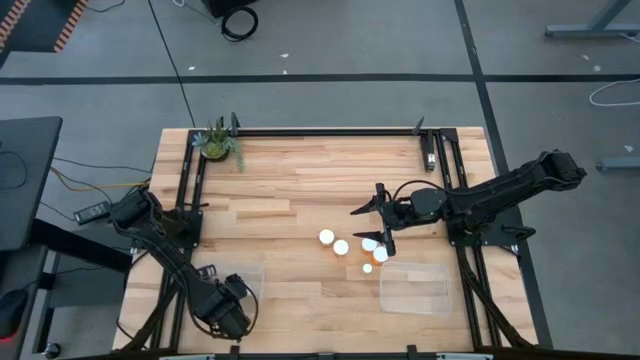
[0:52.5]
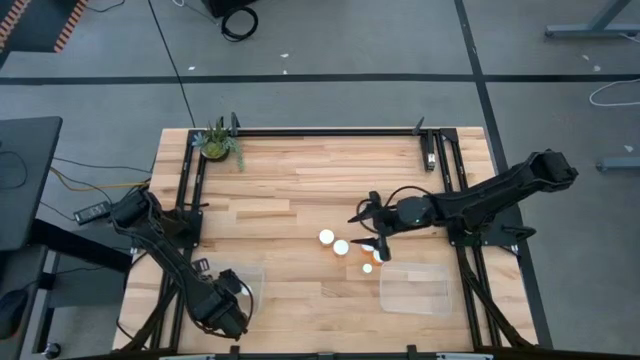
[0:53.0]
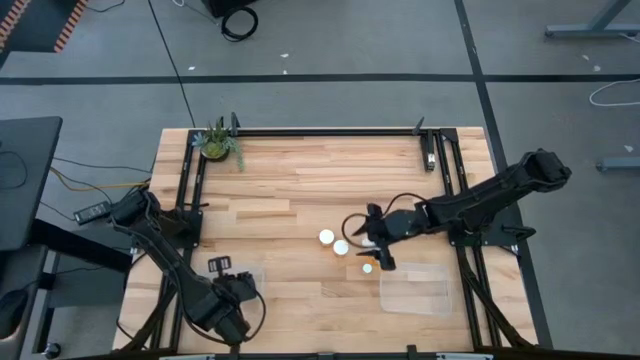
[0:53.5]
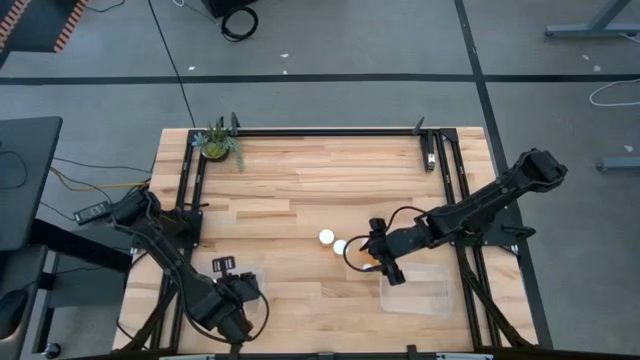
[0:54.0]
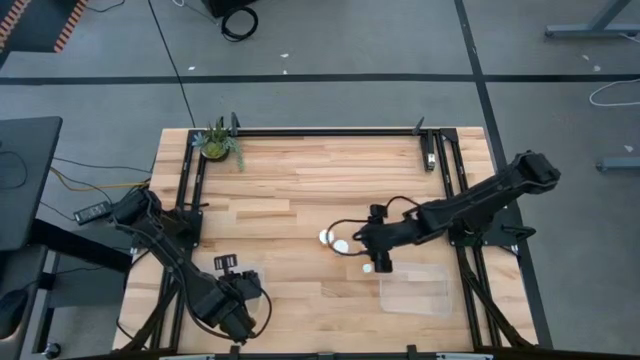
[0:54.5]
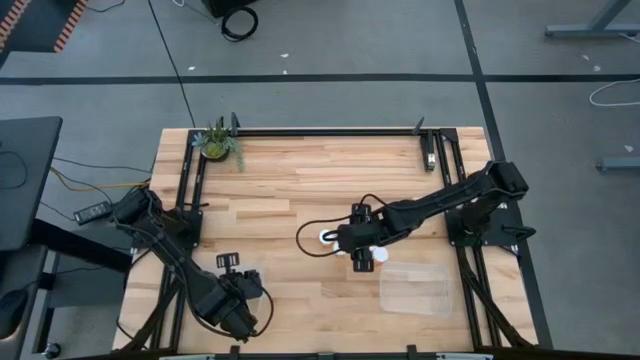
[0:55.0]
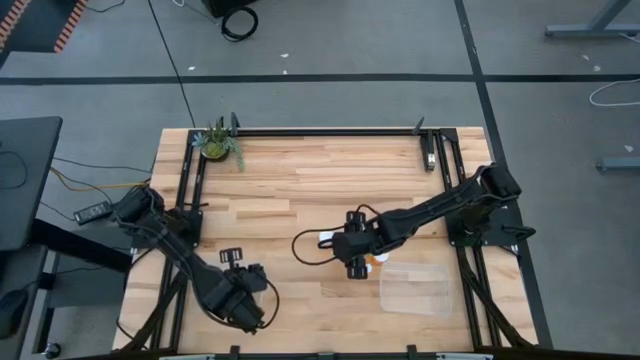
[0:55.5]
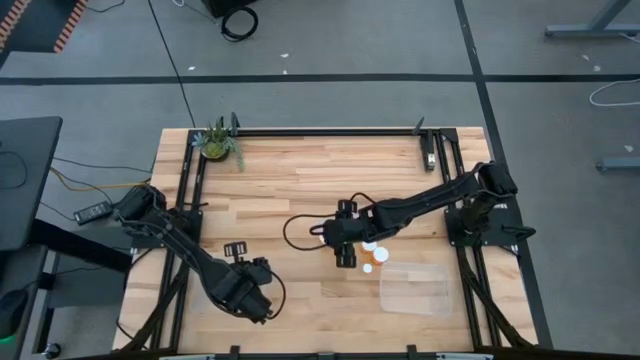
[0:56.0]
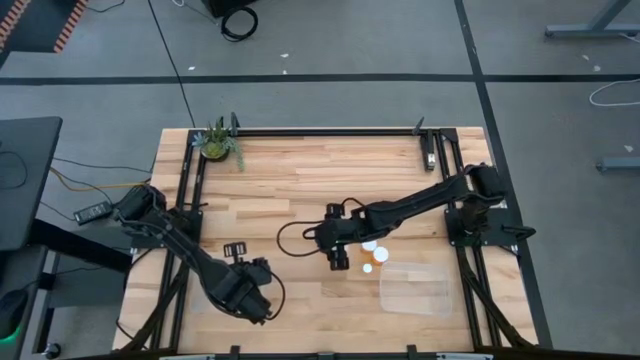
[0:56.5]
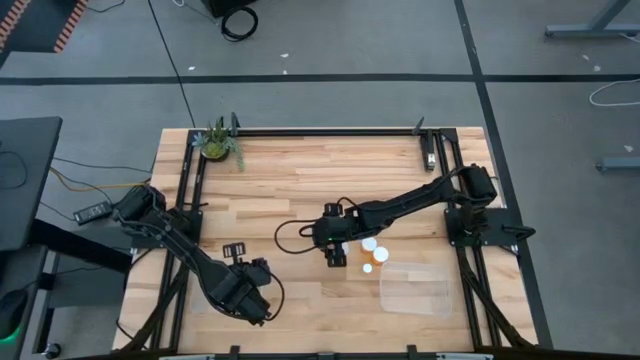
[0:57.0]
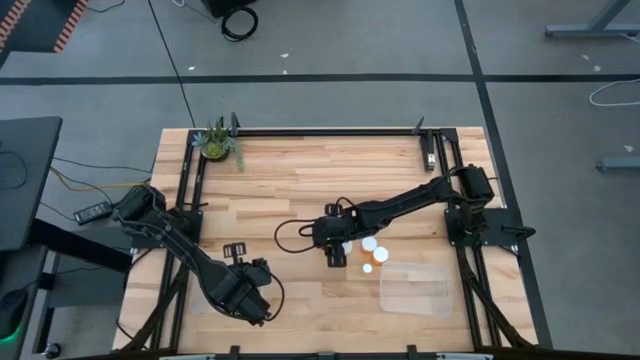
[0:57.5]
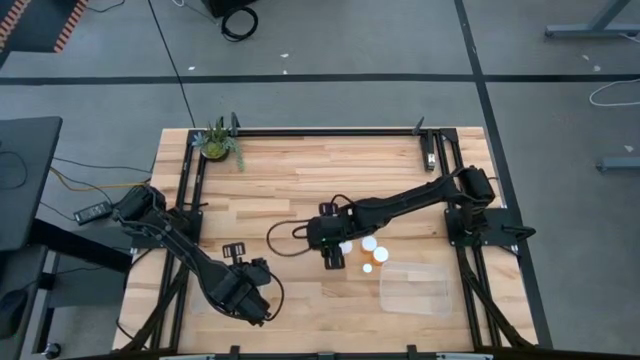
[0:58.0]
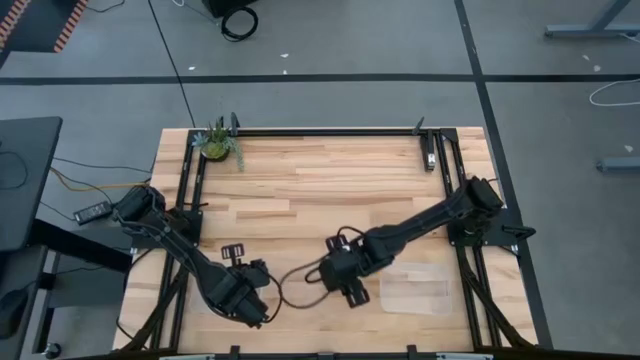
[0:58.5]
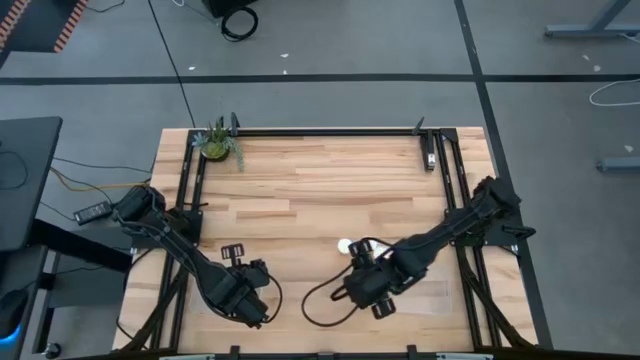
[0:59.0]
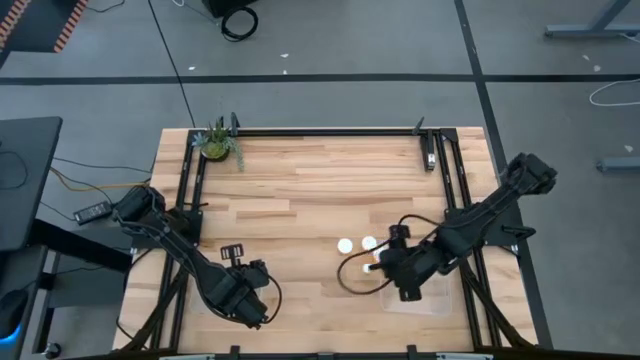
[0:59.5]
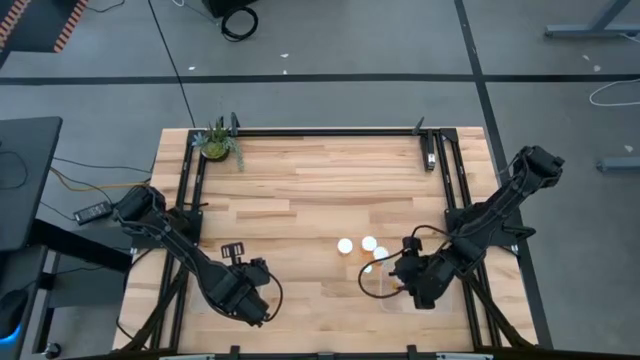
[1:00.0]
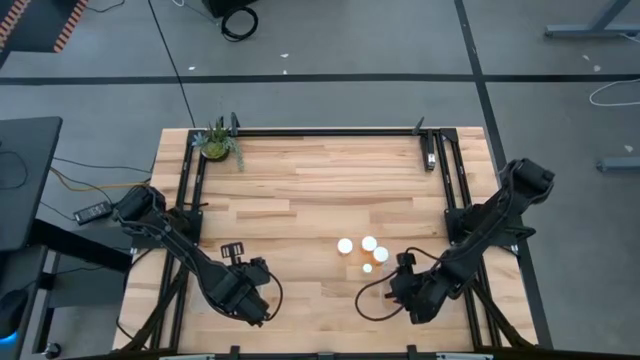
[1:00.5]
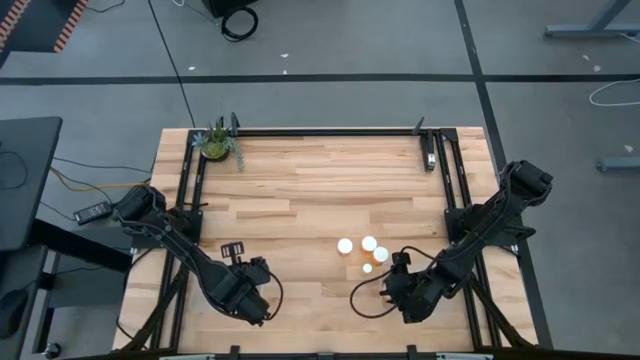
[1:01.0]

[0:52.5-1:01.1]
Task: Pick and place medicine bottles into bin by pill shape (circle, oval)
Put the large orange pill bottle into the right transparent bin

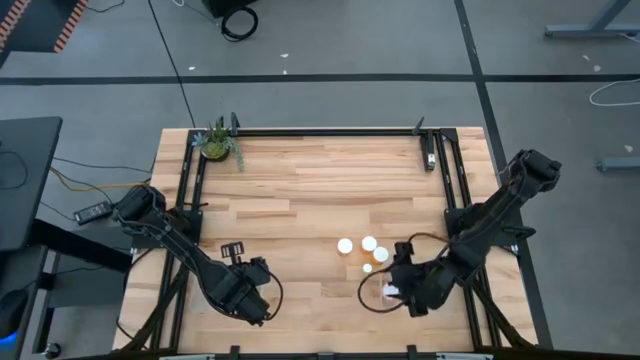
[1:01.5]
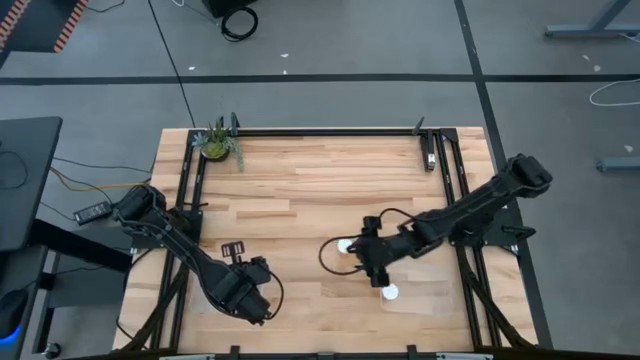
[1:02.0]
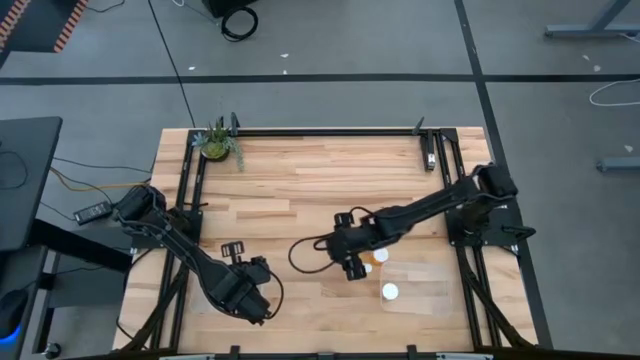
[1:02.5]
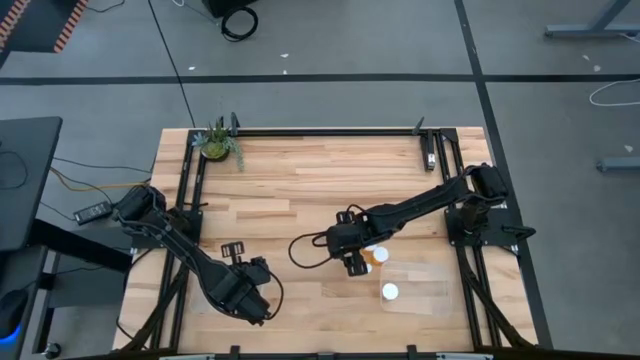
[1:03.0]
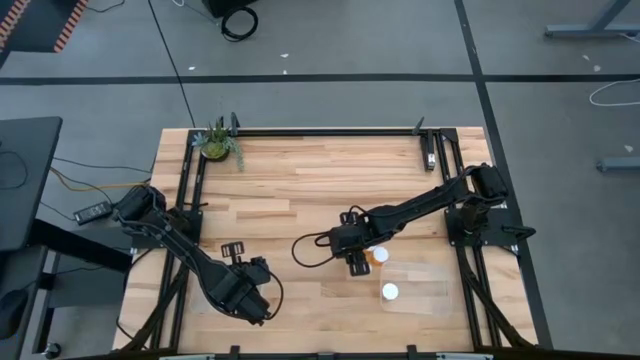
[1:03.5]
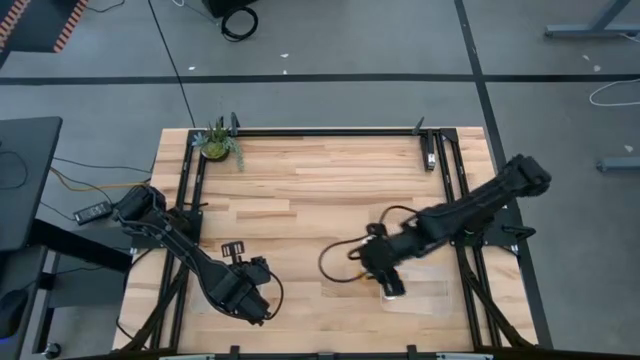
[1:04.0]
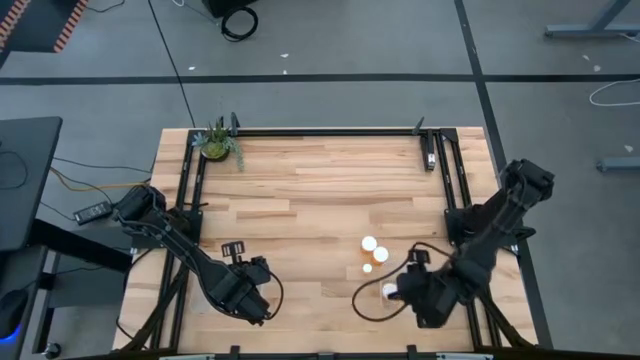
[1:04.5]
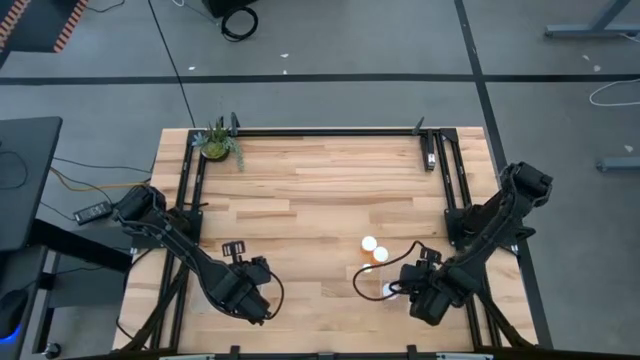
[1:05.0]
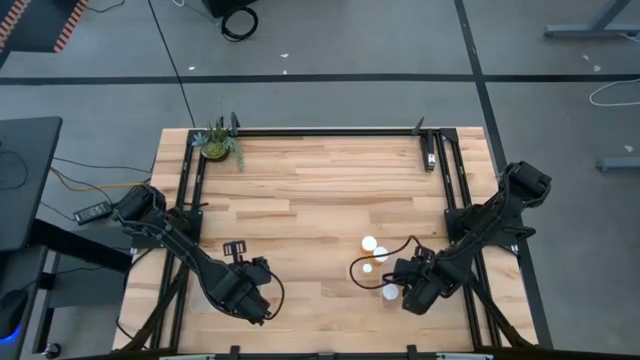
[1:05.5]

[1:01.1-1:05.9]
Put the large orange pill bottle into the right transparent bin

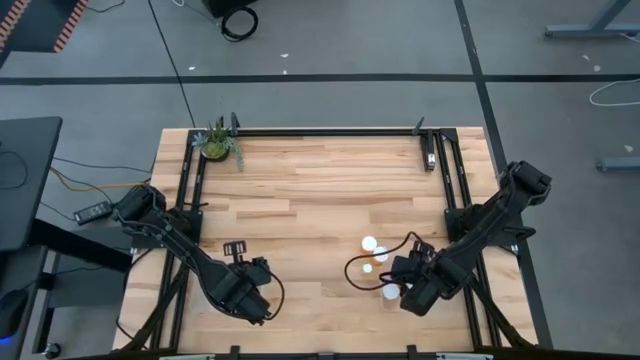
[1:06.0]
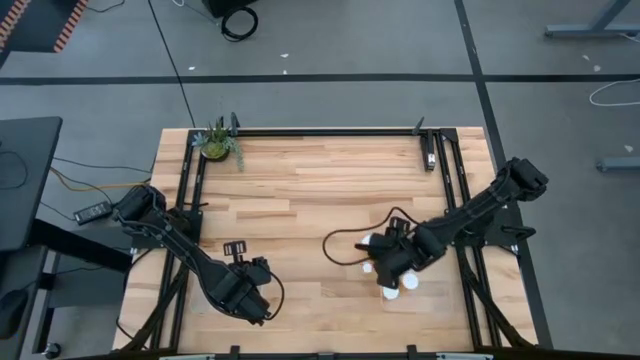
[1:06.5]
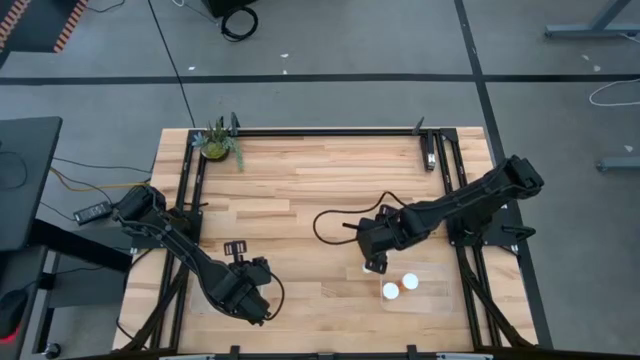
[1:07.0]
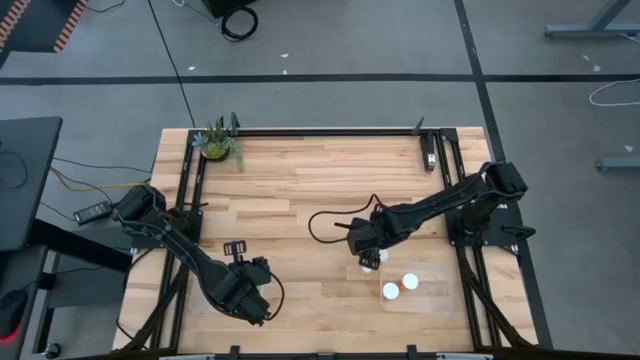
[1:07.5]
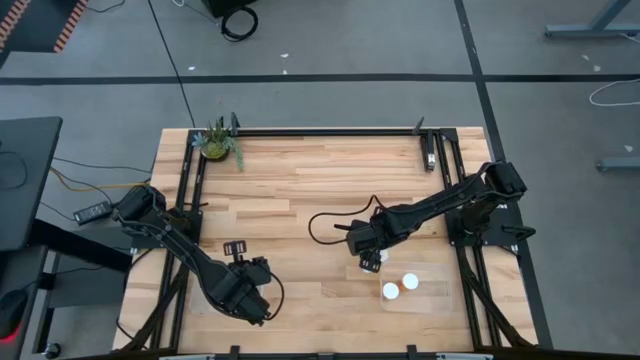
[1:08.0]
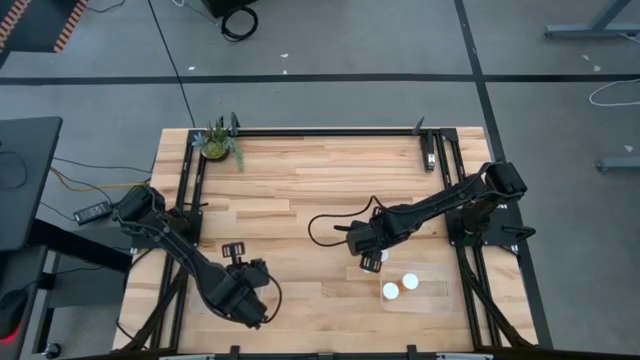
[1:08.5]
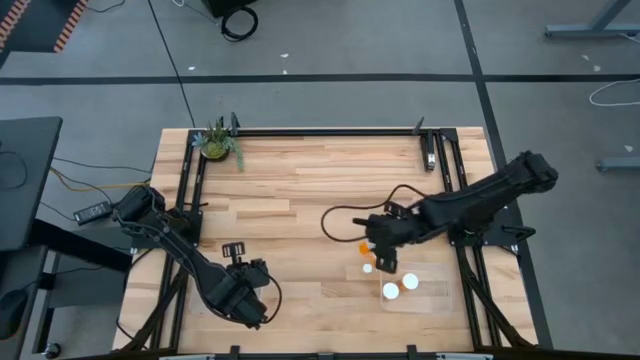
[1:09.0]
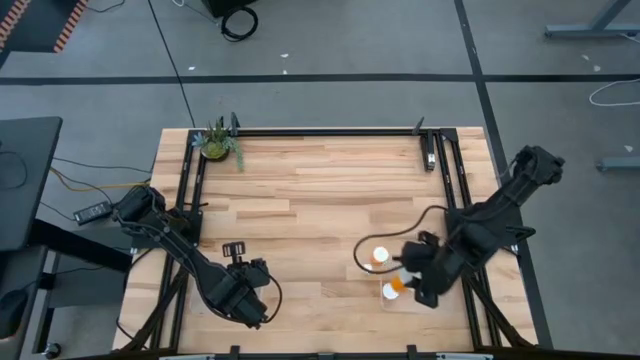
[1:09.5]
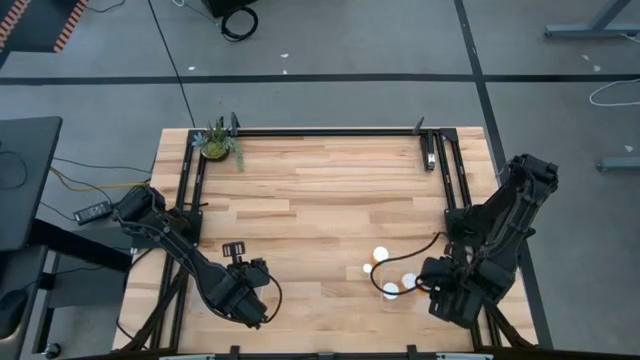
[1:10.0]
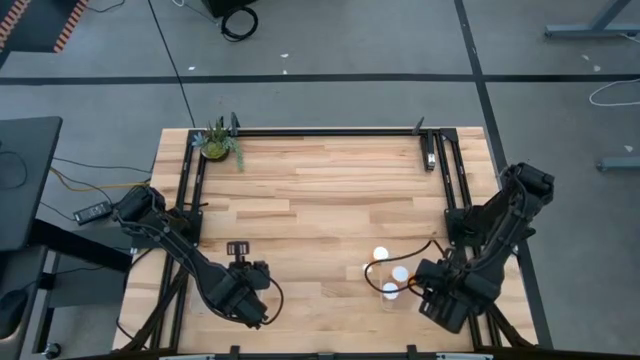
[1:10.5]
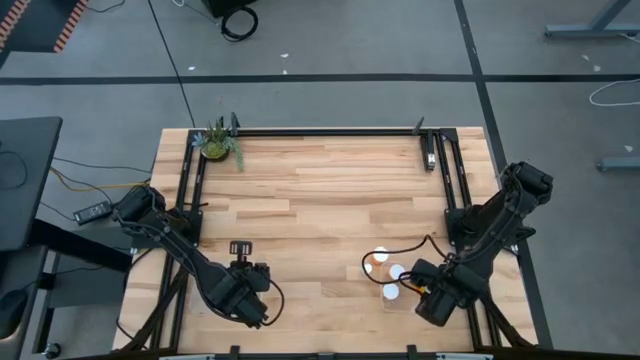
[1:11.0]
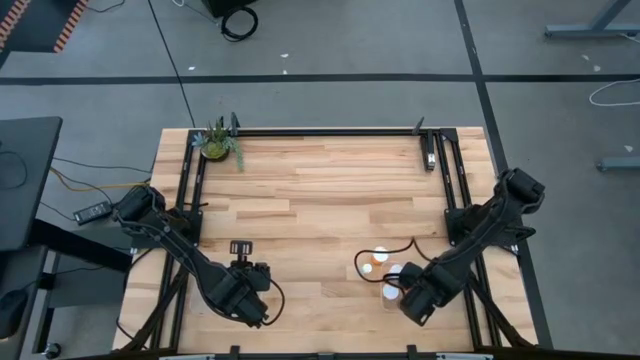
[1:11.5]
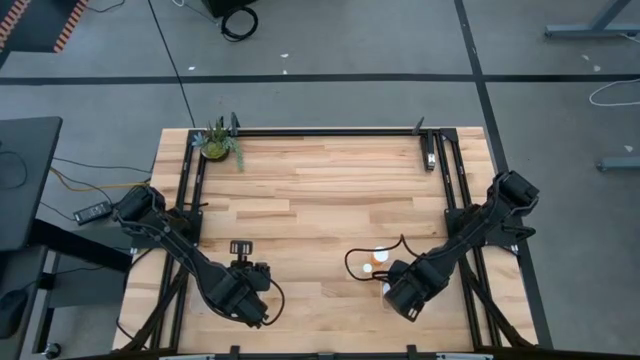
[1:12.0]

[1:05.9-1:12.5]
Put the large orange pill bottle into the right transparent bin
